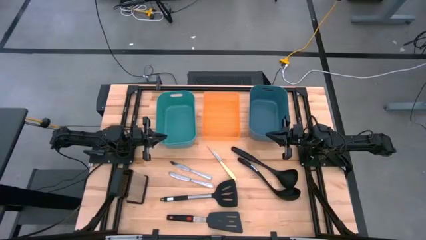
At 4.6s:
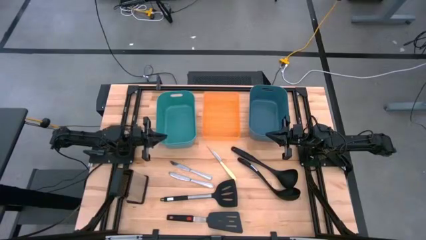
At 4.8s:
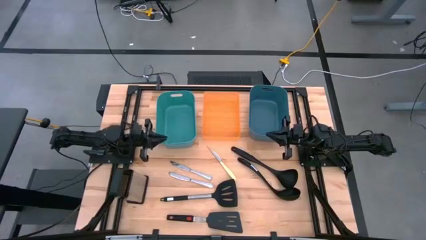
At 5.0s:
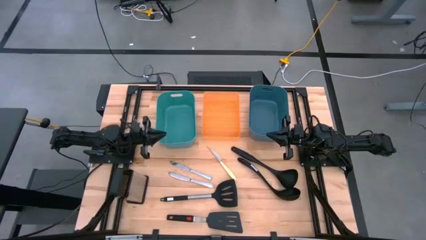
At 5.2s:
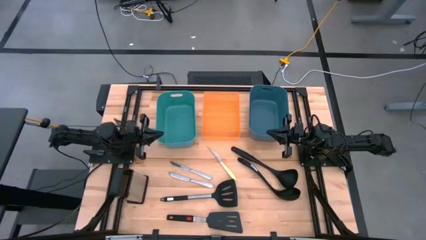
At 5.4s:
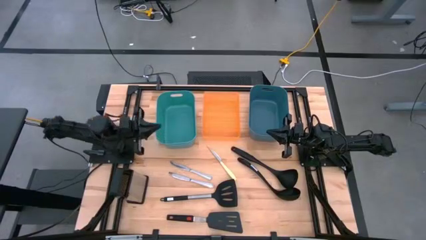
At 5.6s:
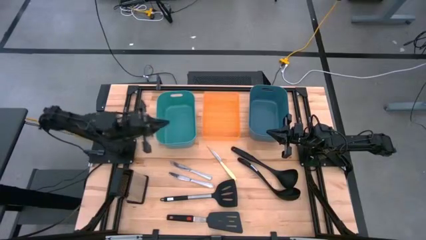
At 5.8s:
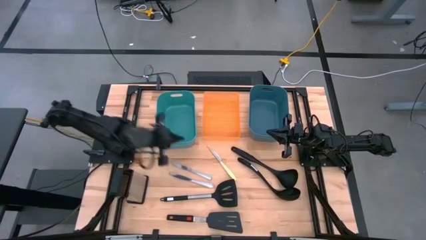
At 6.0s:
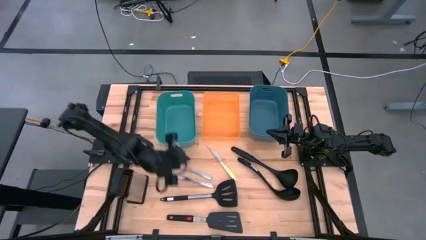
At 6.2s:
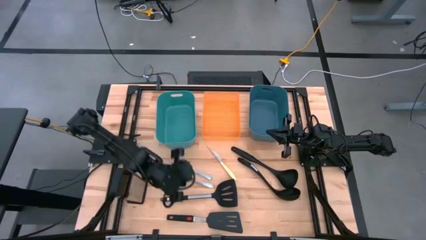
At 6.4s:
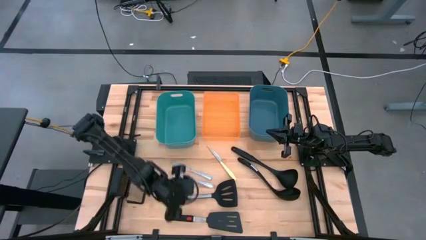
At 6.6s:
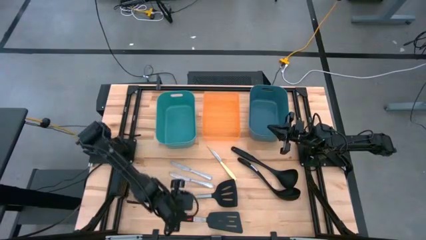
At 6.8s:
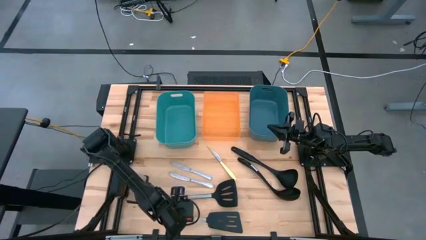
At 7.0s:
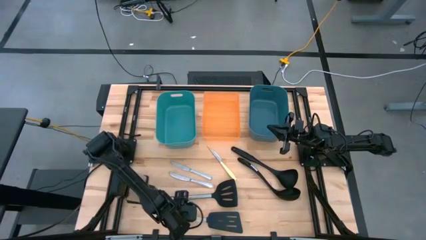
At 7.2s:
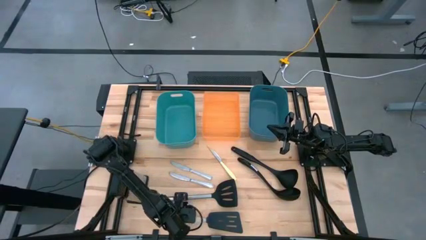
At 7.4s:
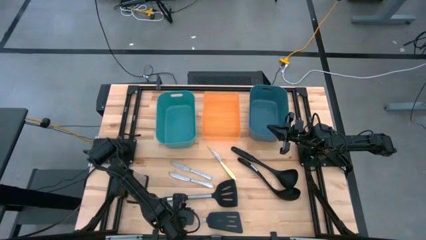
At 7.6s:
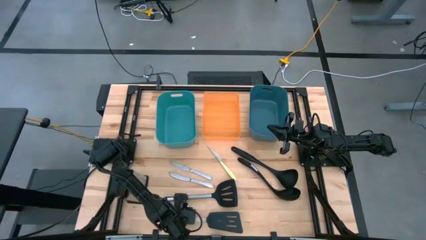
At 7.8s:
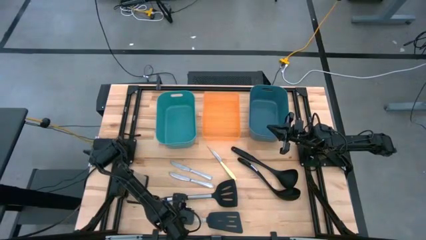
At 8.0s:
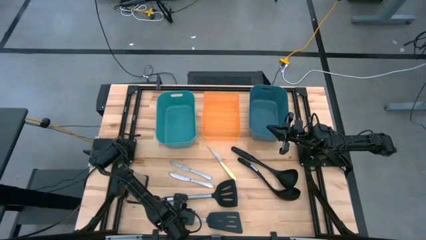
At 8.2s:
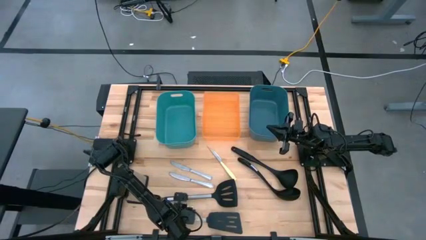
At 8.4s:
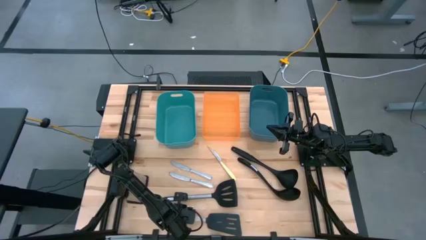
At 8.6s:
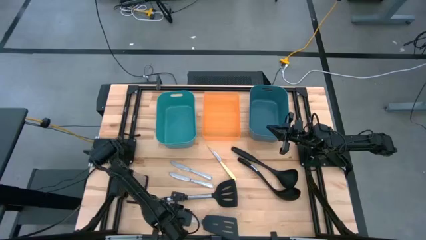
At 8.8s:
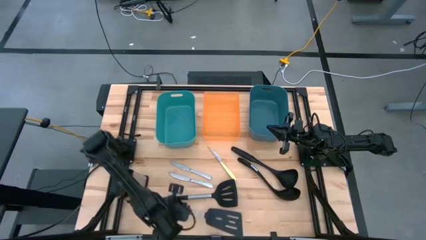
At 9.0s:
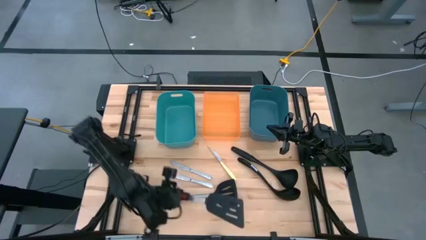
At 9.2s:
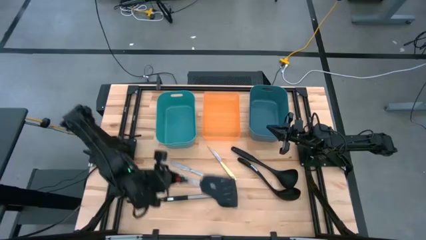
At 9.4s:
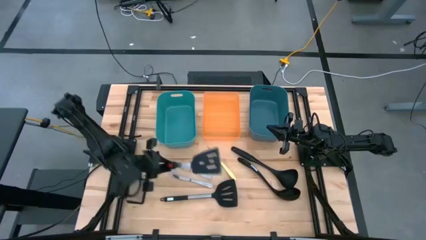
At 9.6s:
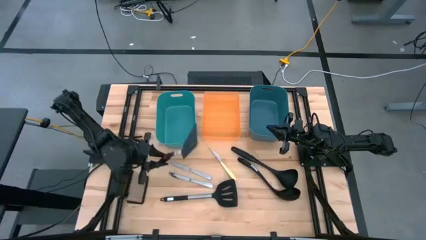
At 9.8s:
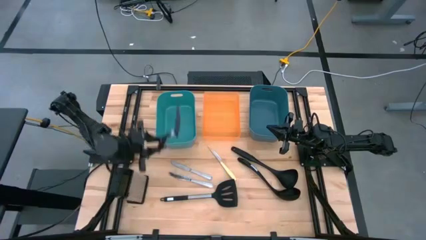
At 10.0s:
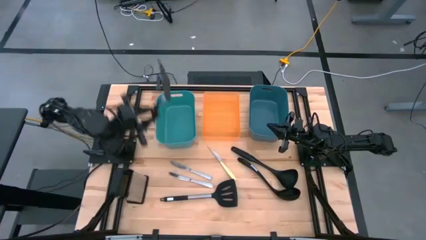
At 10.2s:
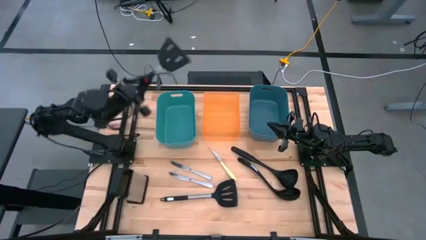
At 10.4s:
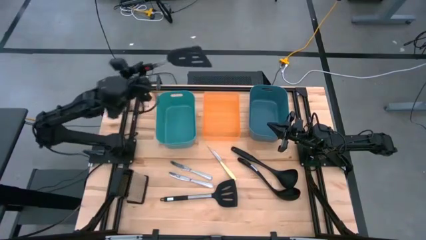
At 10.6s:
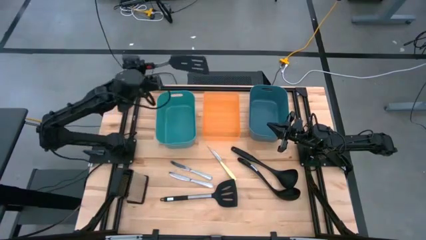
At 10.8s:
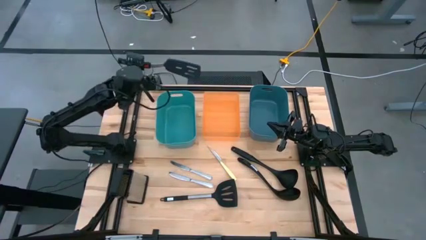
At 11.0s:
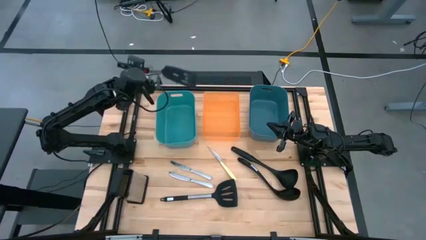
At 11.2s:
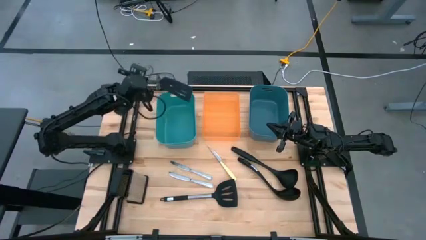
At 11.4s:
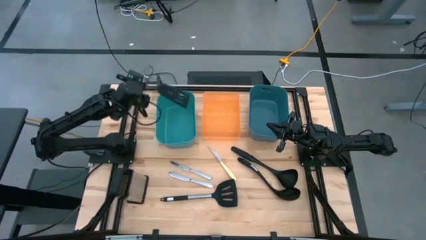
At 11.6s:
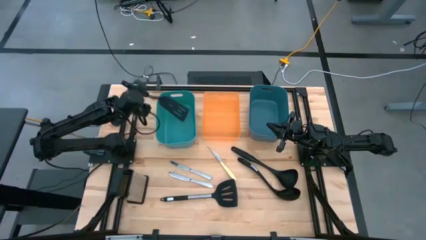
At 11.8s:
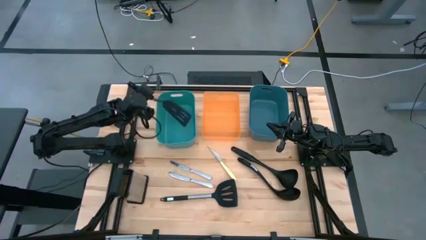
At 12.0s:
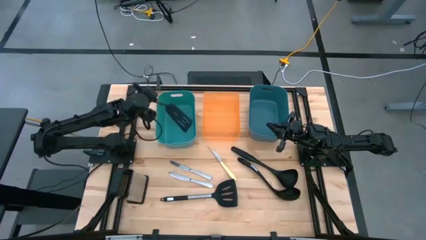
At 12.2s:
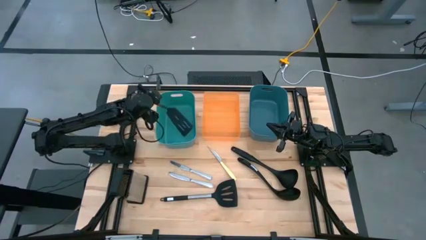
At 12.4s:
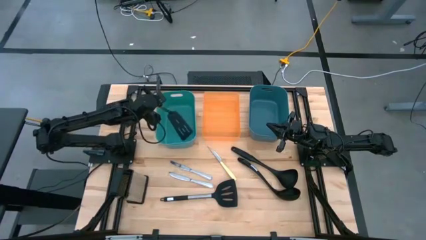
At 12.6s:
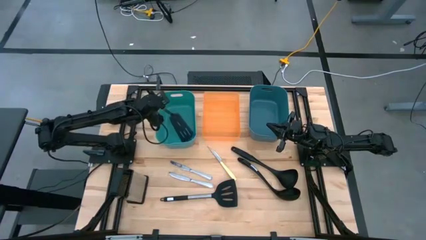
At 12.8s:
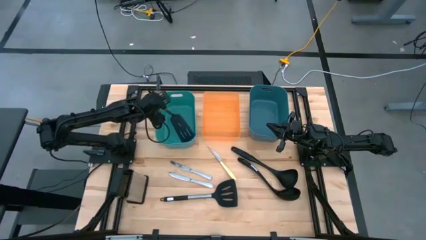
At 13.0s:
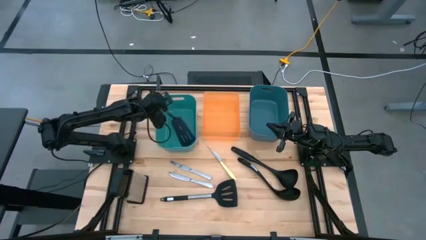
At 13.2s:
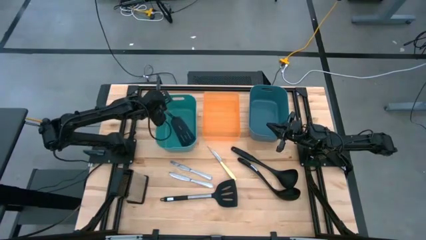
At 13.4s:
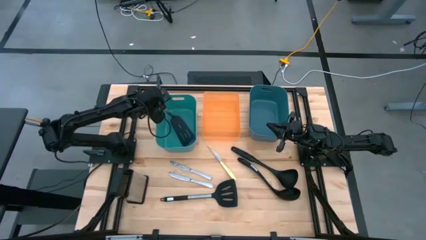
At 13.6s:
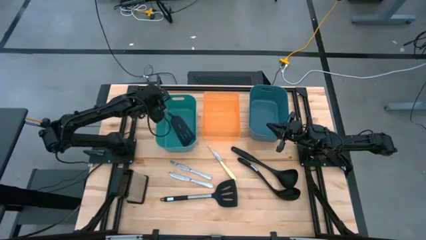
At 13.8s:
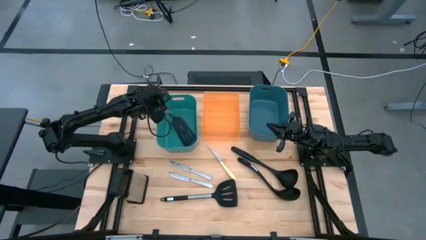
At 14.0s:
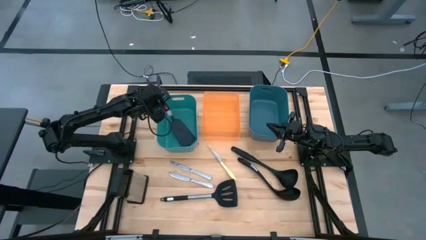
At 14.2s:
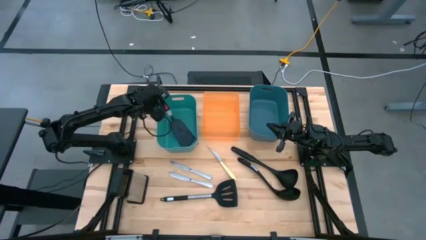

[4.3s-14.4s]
Task: Pick & Place Kitchen Items
Put the gray spatula into the green bin

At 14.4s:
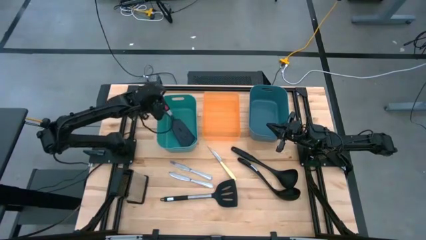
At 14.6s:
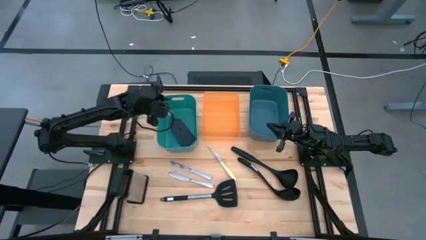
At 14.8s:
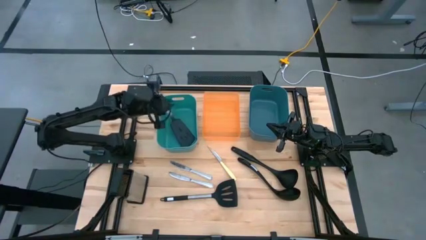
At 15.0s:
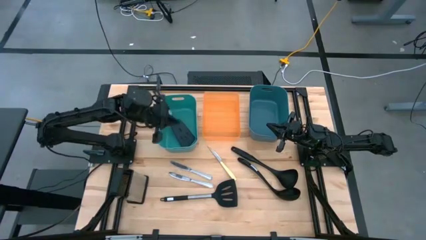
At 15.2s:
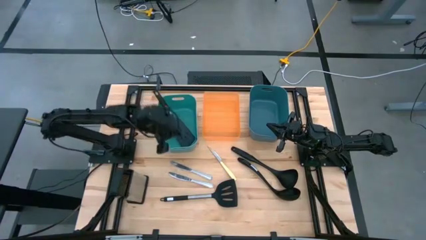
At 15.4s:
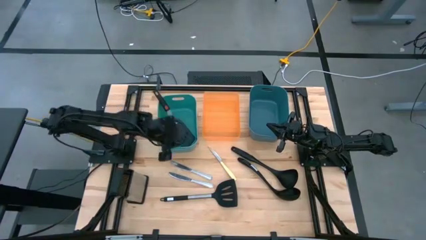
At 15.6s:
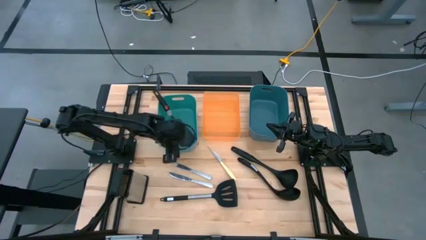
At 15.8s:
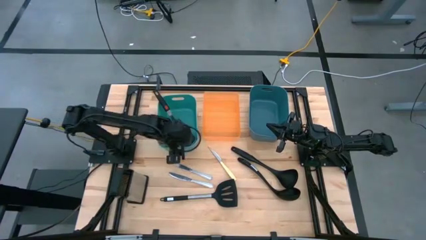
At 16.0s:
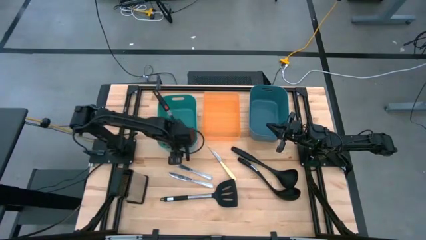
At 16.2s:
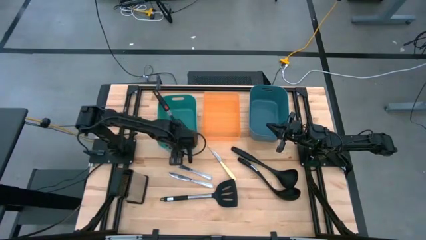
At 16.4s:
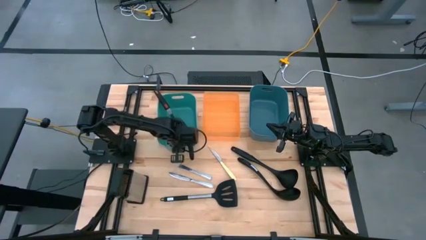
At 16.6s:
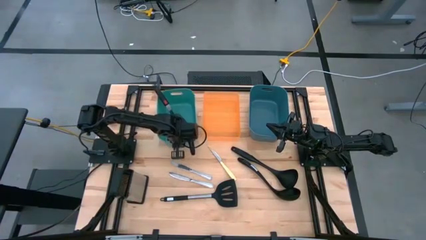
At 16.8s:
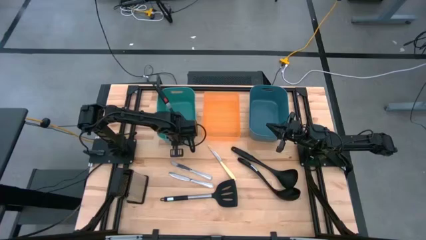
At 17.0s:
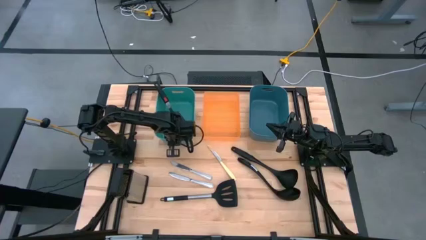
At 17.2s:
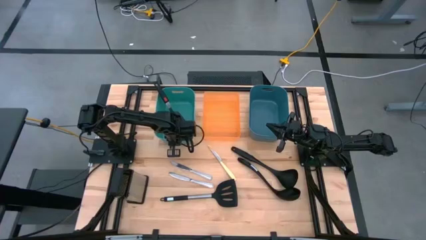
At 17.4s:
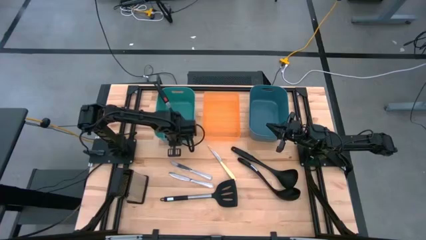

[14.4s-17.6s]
Adjust the green bin

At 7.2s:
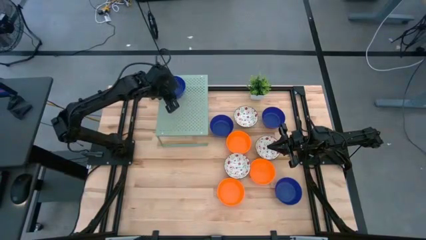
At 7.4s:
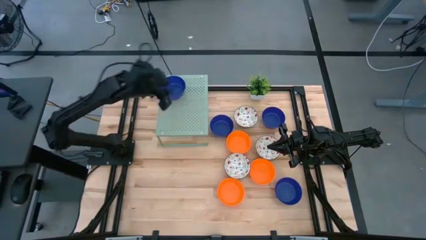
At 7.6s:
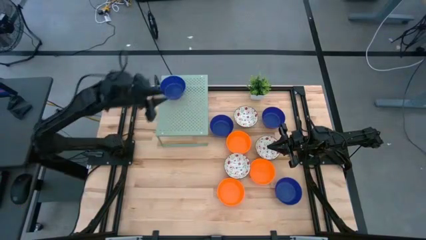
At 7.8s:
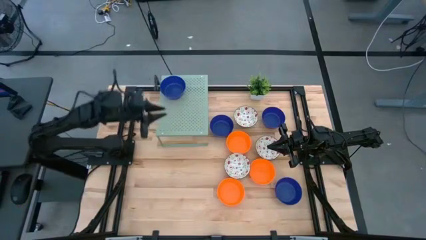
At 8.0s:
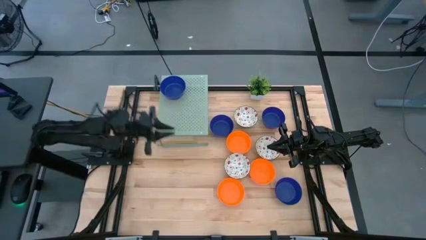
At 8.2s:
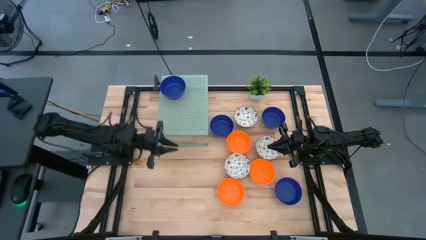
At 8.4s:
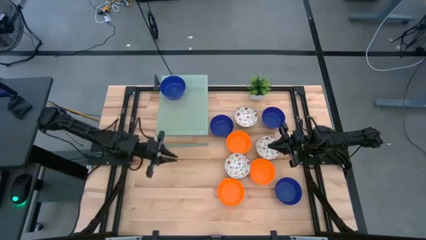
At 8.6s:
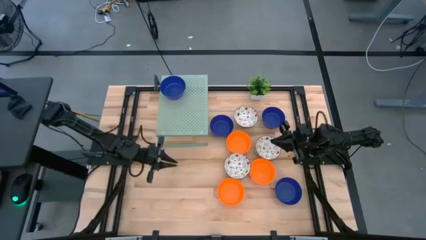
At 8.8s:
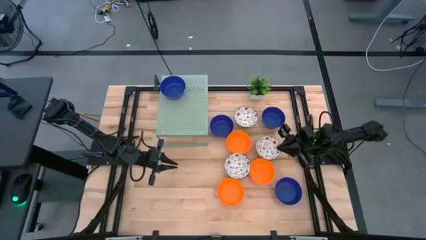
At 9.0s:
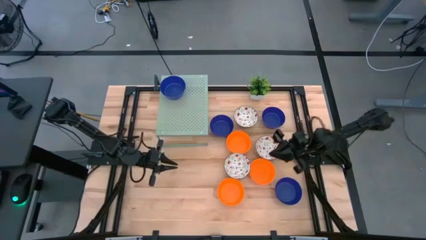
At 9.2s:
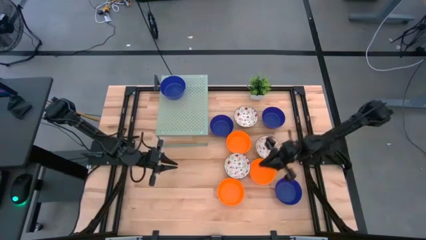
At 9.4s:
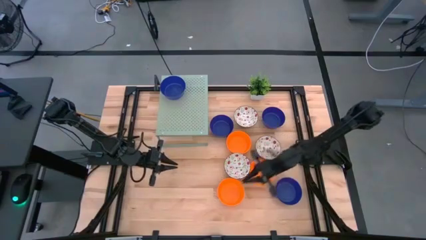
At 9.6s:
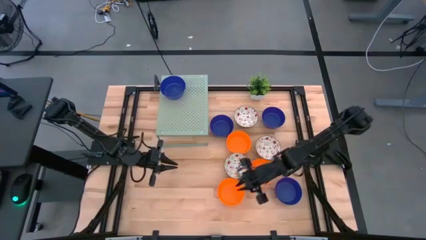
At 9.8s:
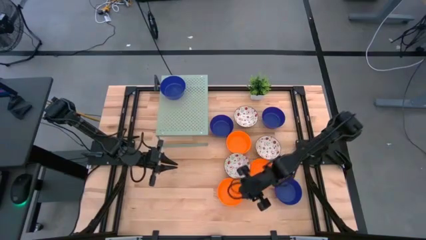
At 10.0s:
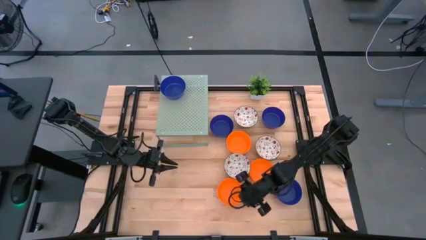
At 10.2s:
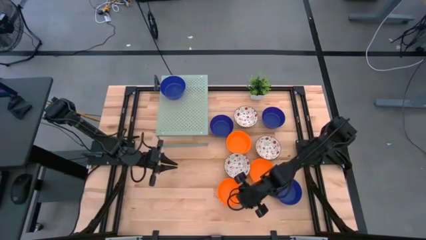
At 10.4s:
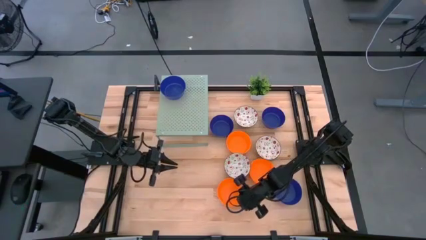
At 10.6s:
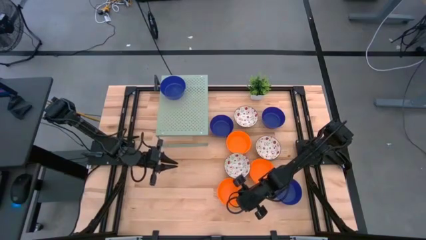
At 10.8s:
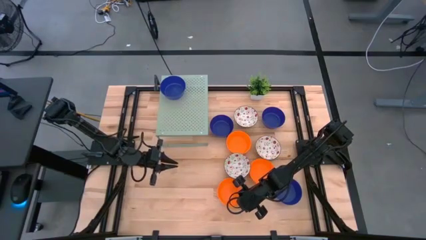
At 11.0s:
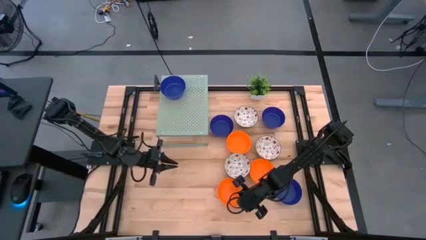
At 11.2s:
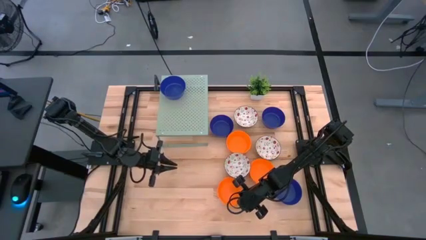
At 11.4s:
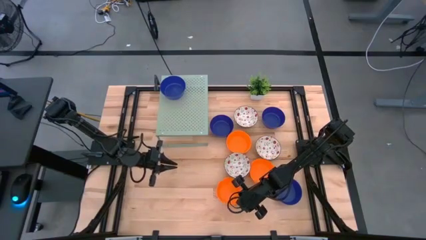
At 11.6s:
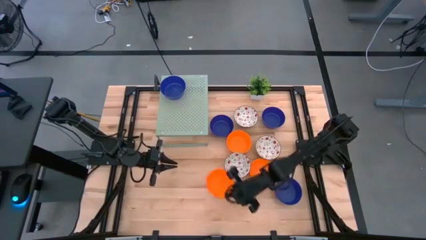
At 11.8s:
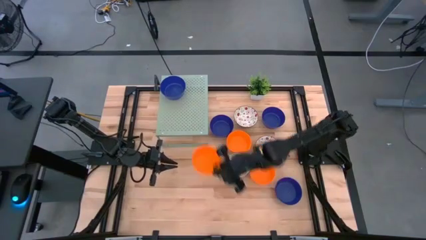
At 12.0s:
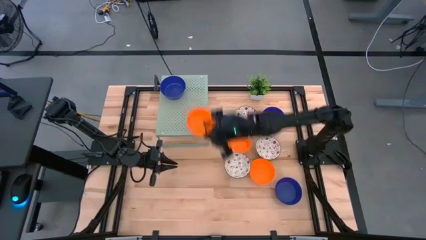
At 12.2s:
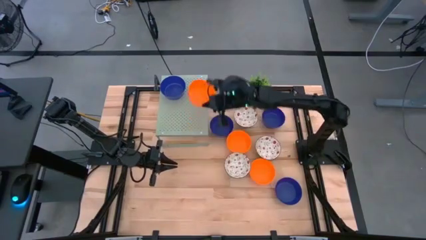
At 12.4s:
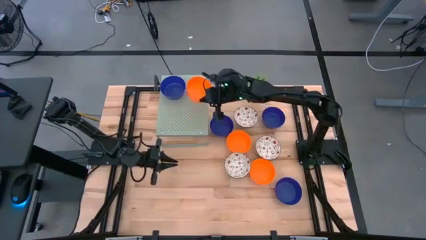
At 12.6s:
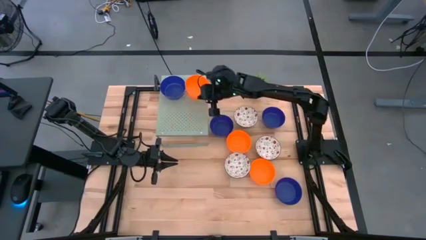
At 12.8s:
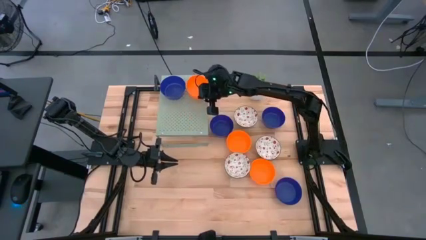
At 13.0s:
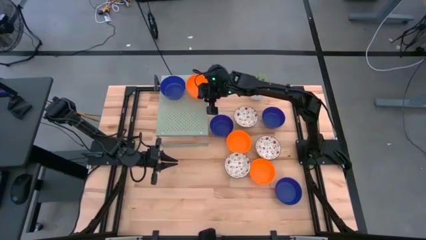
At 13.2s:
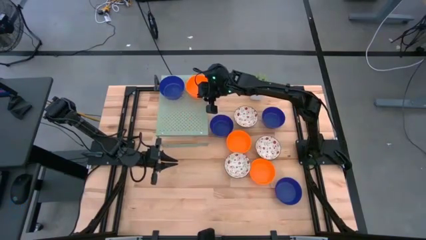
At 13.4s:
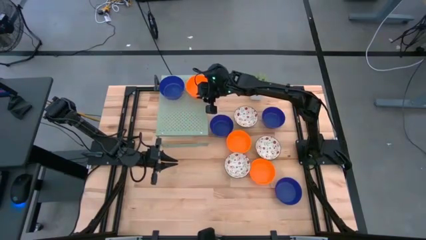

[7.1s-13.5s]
Task: Pick & Place Mini bowls
Put the left bottom orange bowl on the shelf
